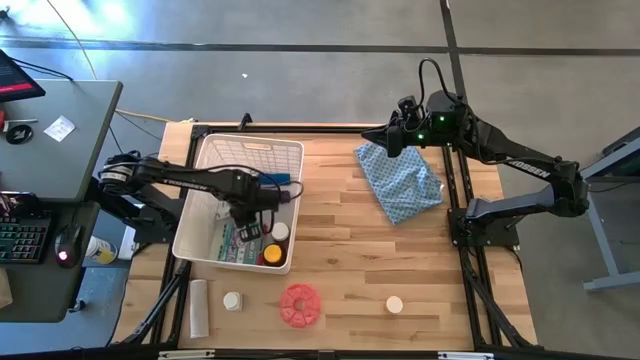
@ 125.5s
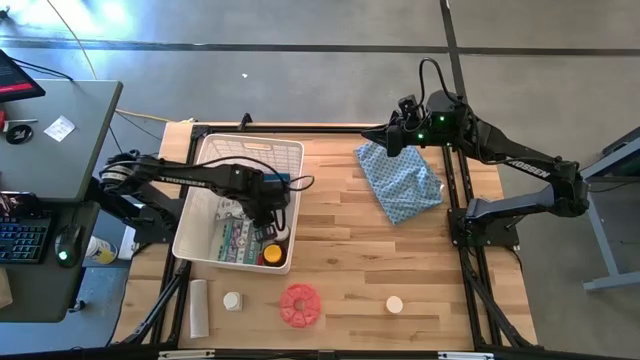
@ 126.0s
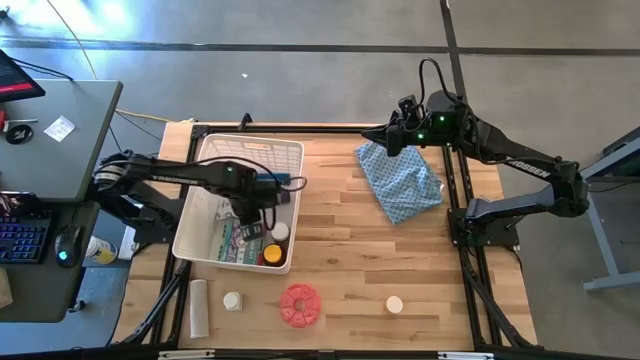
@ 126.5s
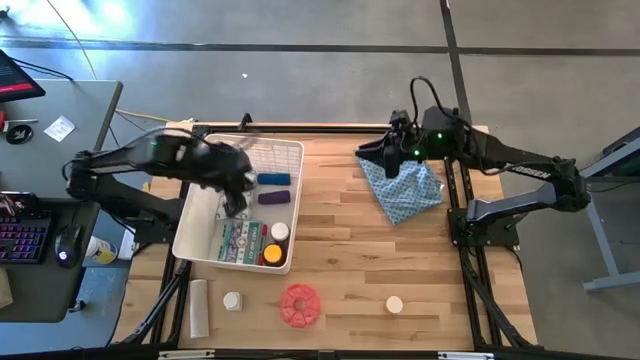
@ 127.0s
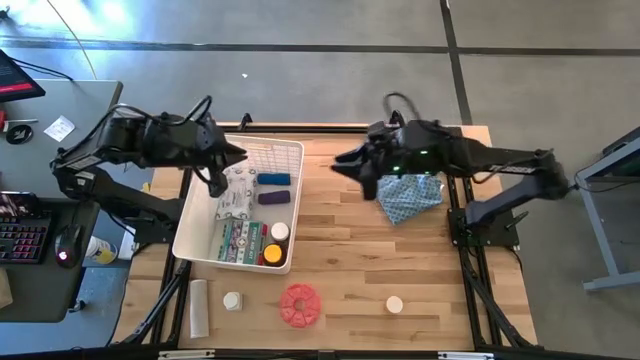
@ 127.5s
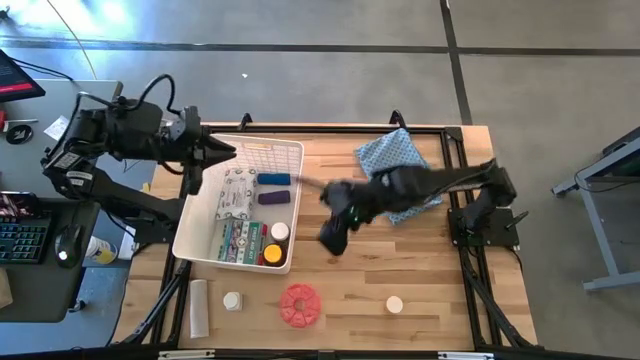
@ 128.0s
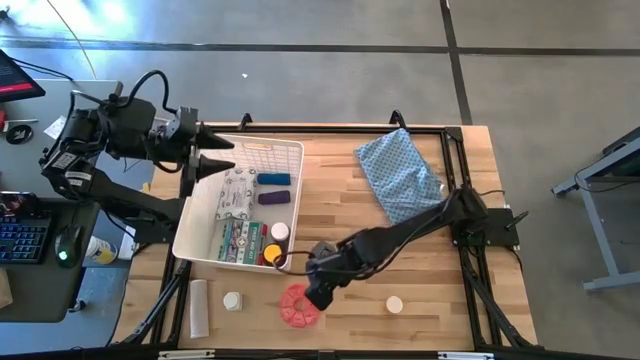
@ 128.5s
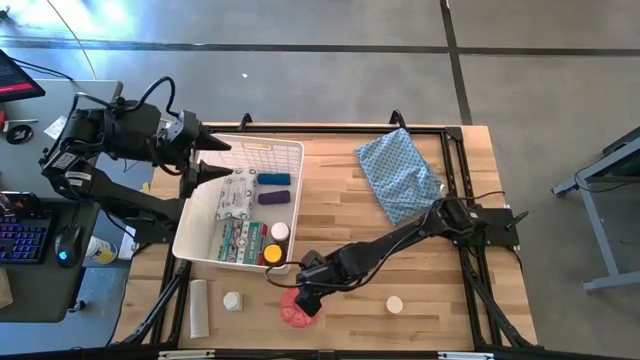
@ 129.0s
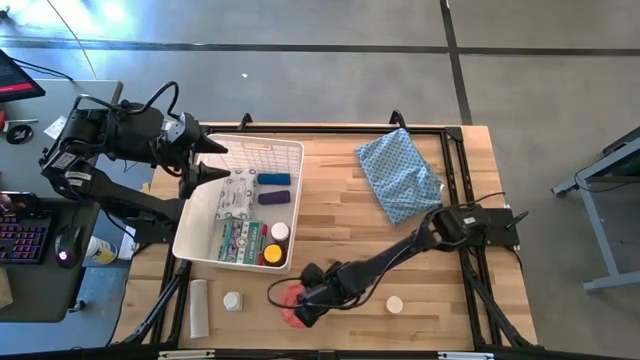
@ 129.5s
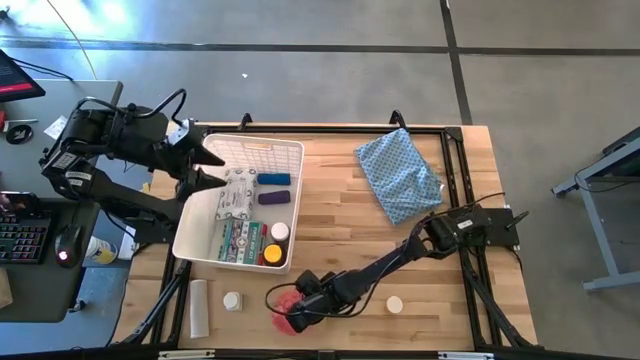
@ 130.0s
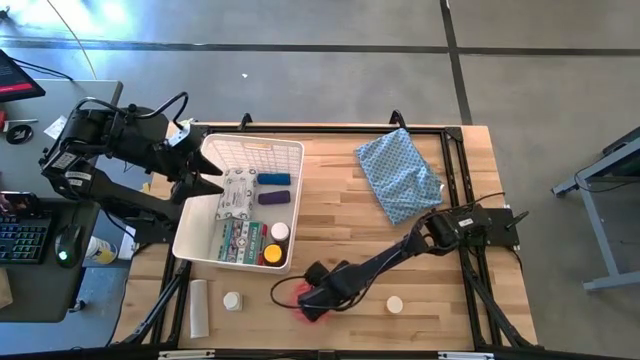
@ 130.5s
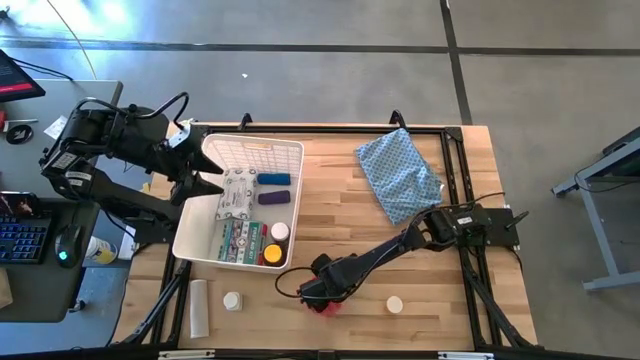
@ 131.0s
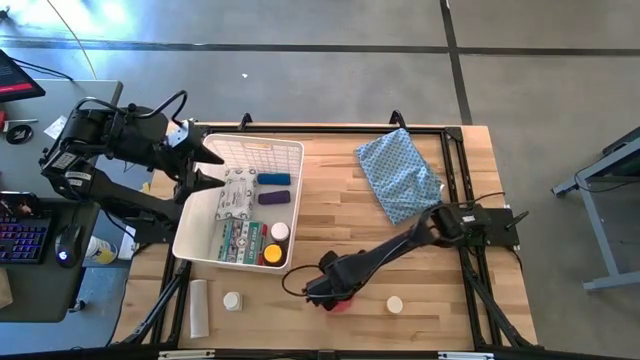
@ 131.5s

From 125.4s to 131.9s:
Task: Pick & place medical supplies in basket/bin
Put the pink pill organizer into the white bin

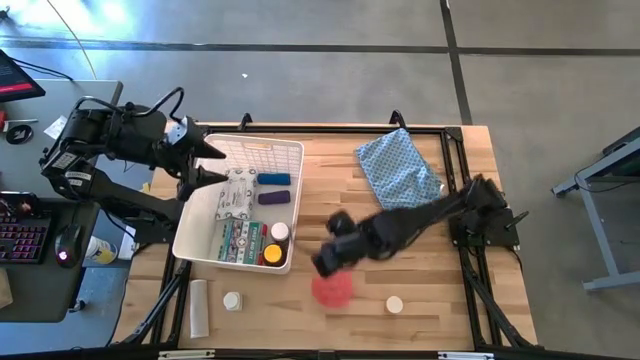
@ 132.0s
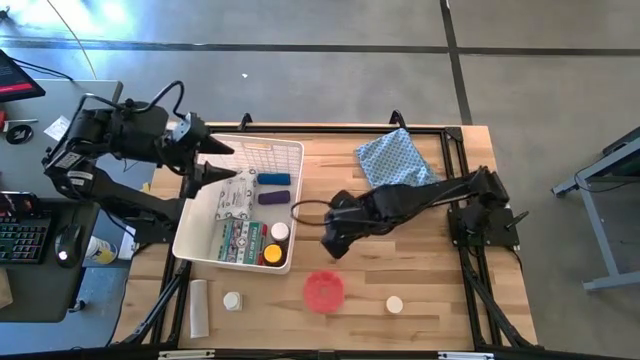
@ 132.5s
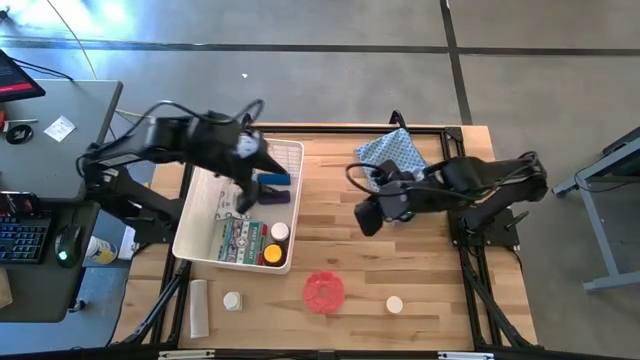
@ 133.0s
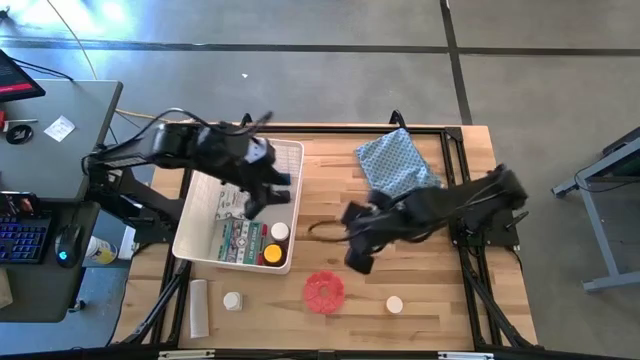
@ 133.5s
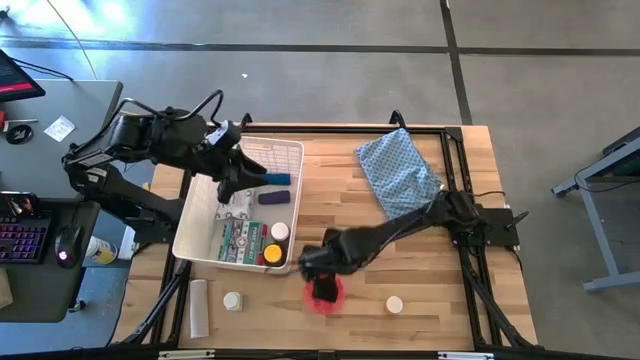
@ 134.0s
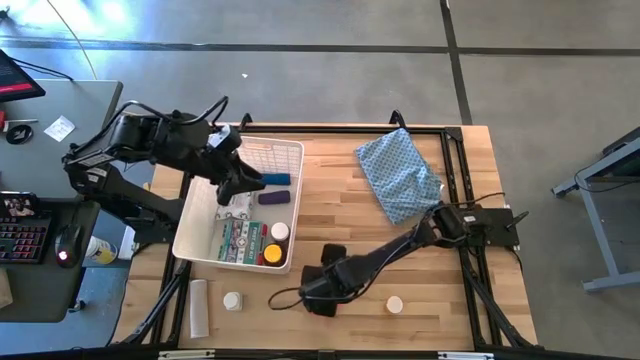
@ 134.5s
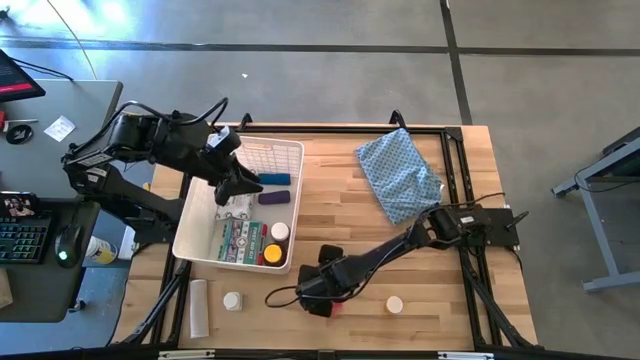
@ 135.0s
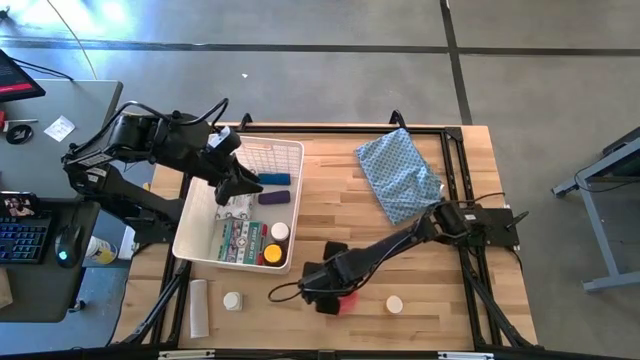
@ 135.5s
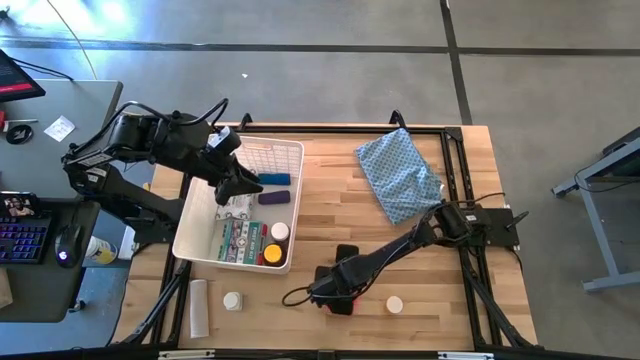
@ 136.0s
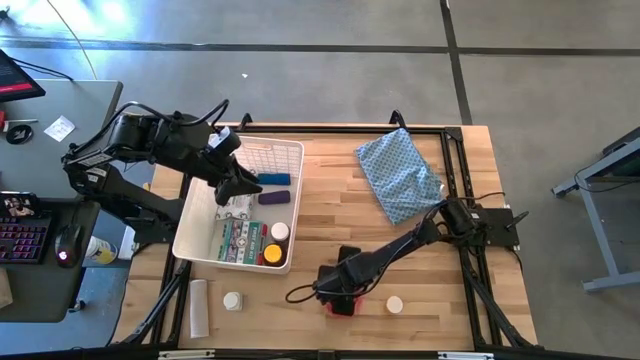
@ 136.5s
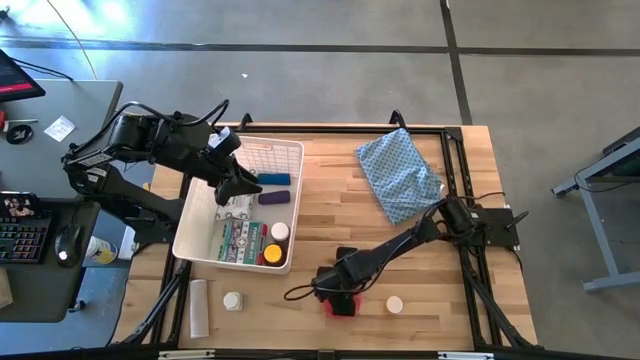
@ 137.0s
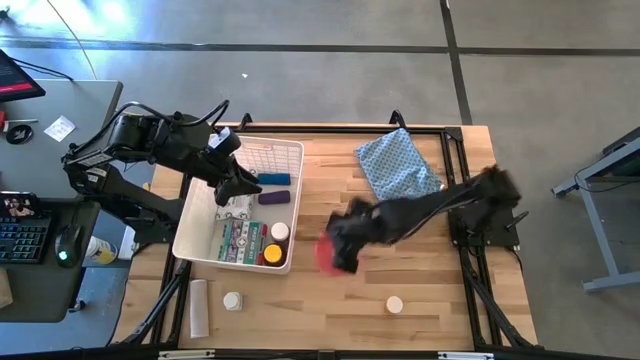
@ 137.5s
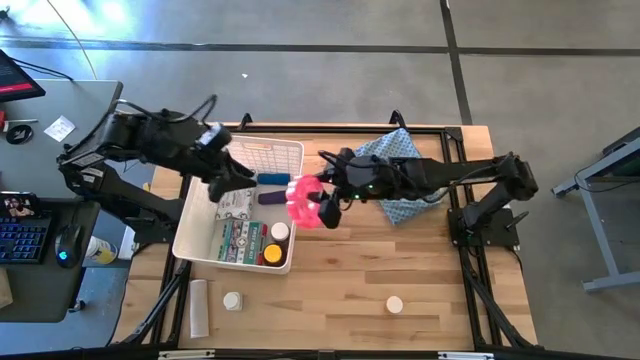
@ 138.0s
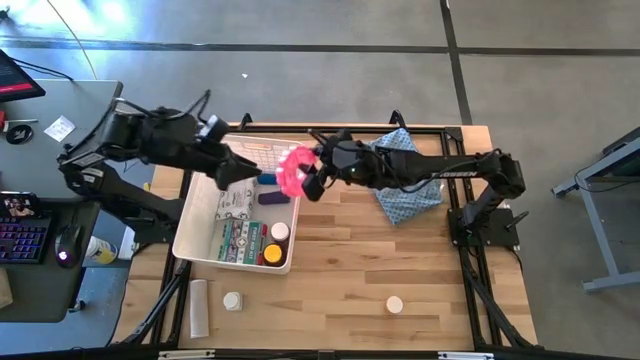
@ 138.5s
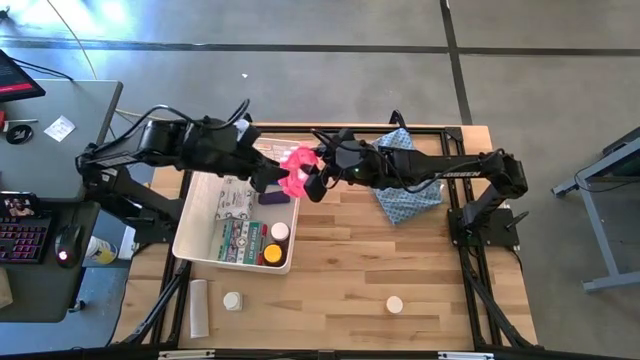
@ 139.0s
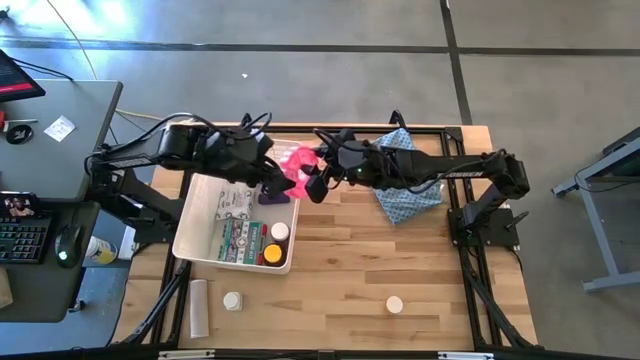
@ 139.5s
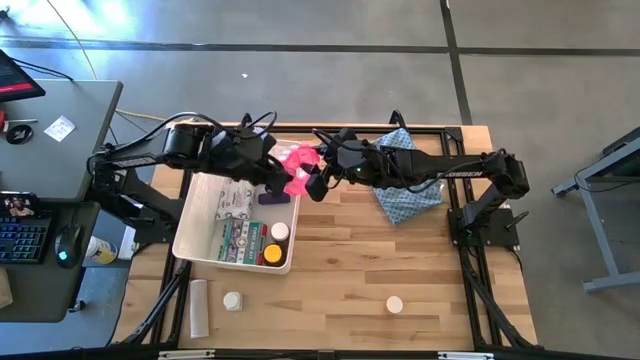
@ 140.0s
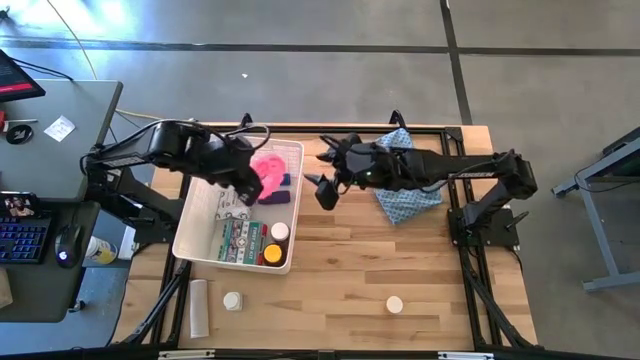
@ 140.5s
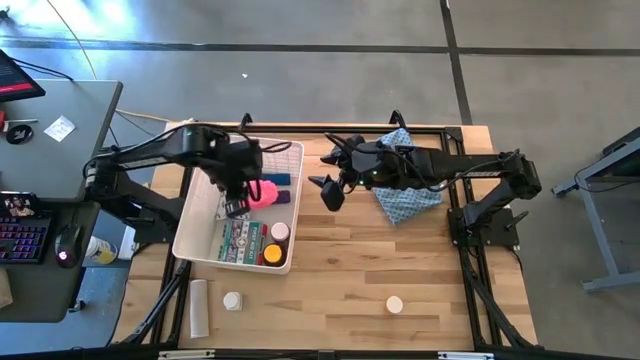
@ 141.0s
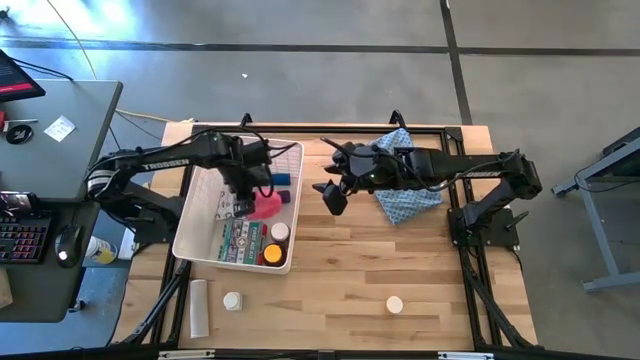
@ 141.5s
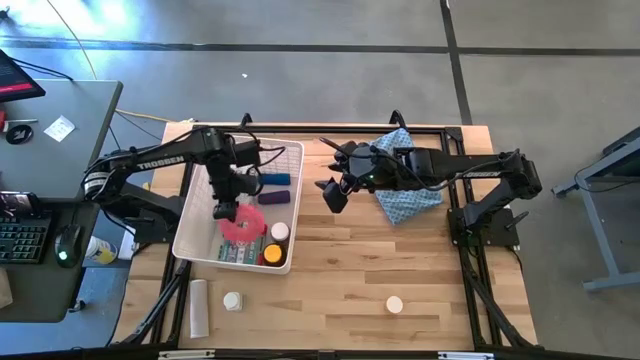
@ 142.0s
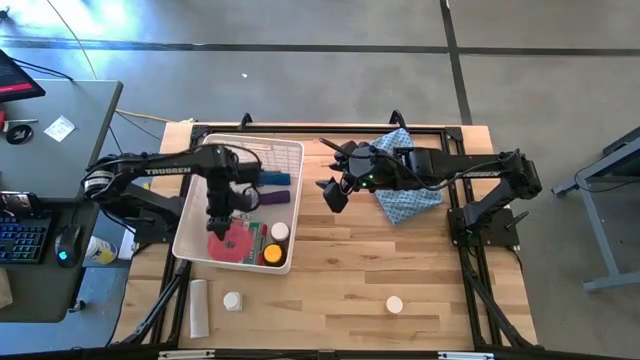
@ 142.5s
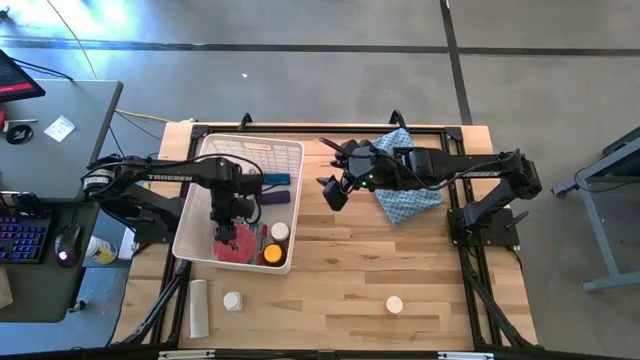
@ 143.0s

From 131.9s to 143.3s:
Put the pink pill organizer into the white bin

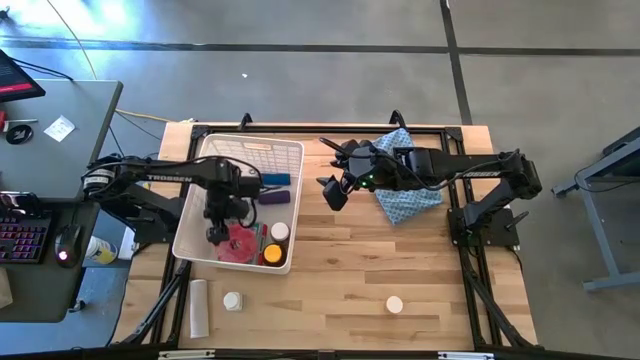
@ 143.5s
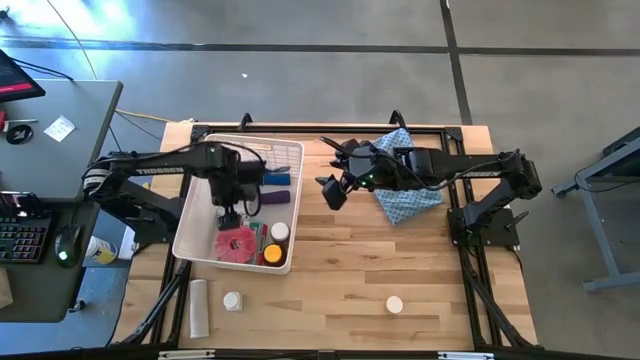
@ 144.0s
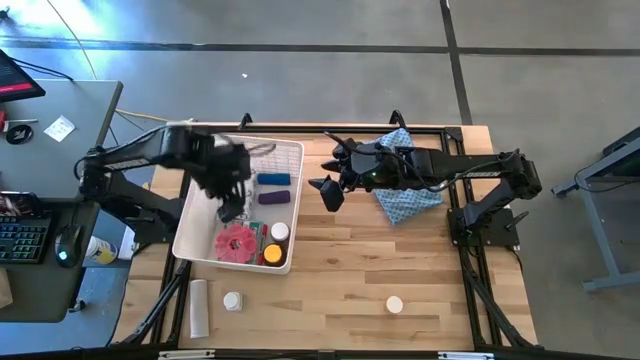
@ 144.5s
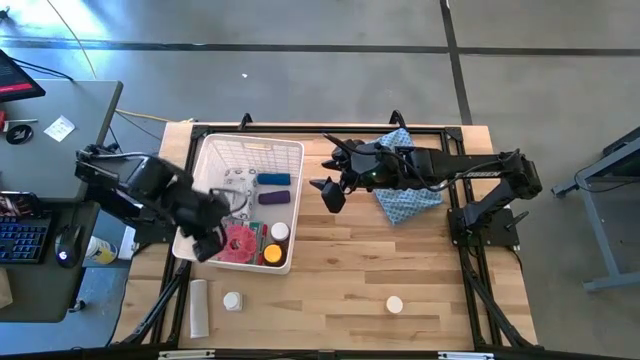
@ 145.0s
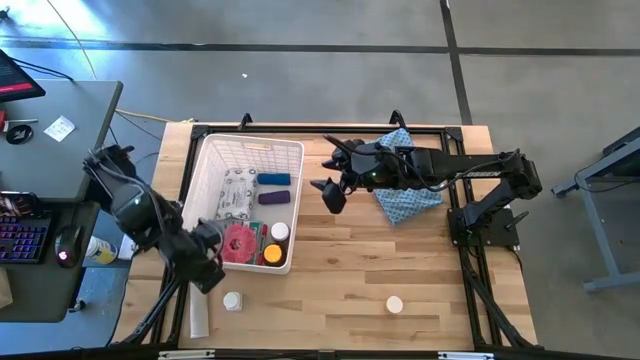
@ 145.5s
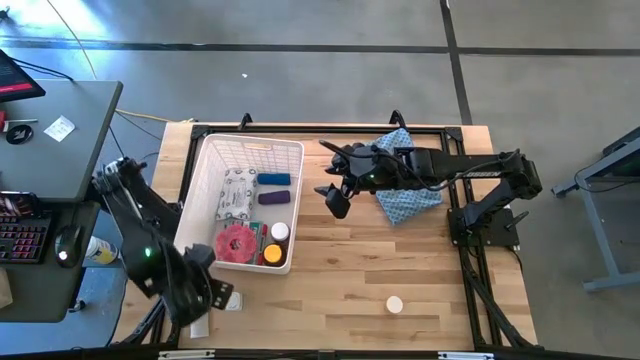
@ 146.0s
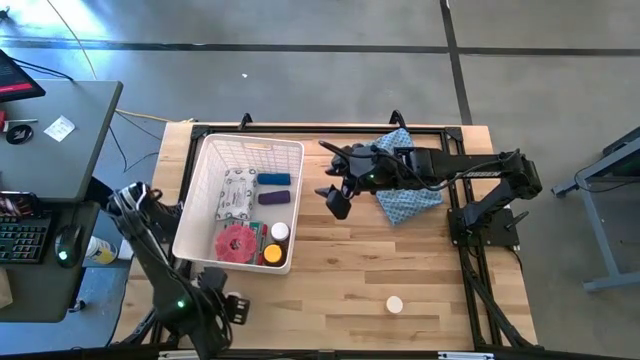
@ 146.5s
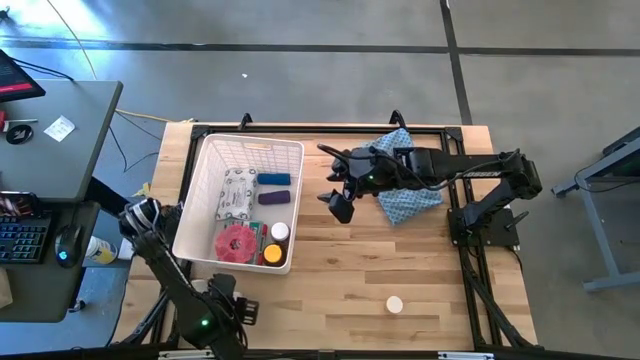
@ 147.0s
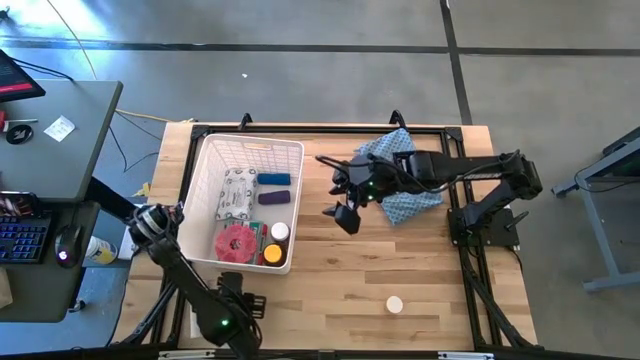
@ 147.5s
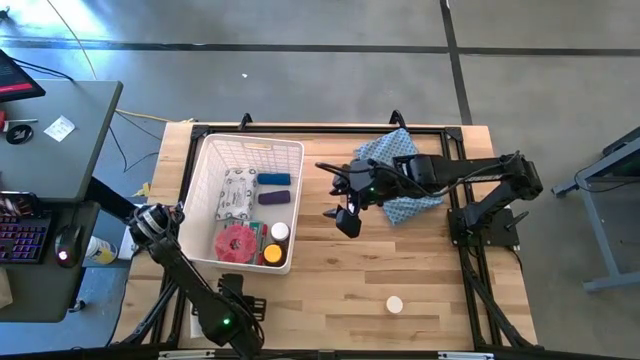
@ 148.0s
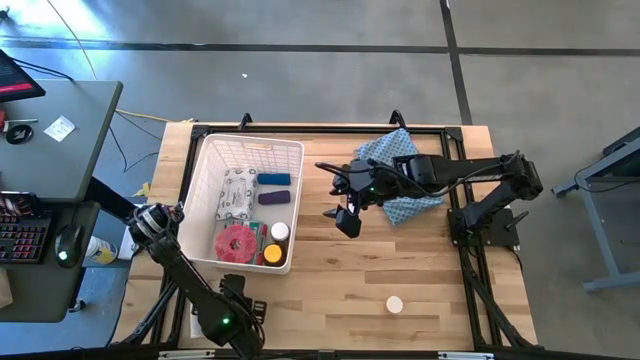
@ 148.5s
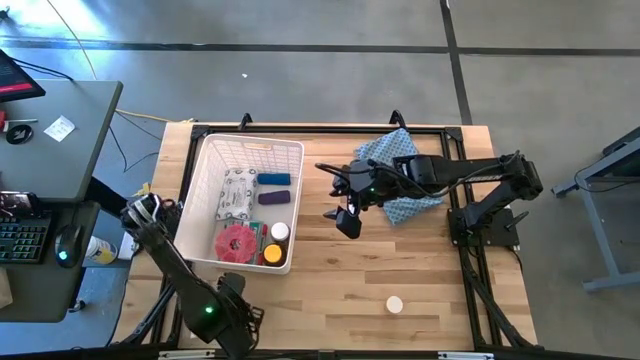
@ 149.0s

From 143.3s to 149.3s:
Put the white medicine bottle into the white bin
